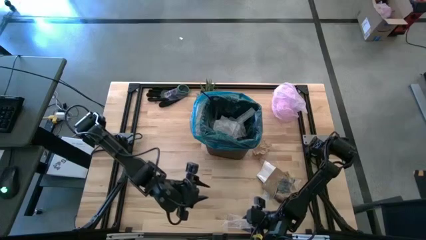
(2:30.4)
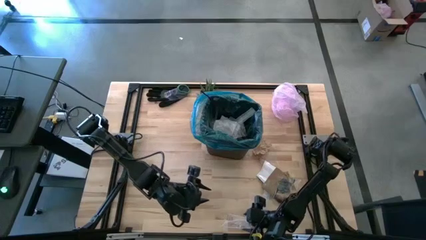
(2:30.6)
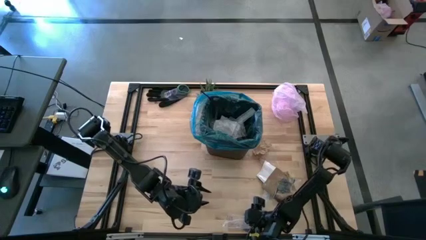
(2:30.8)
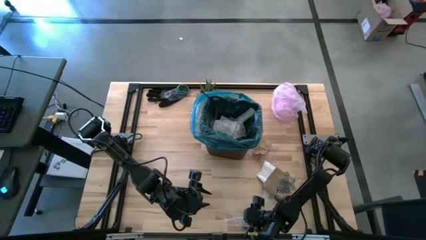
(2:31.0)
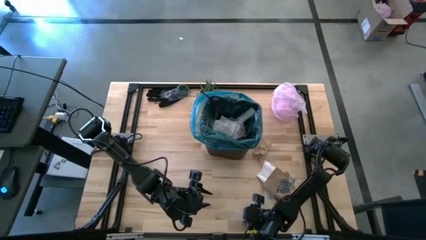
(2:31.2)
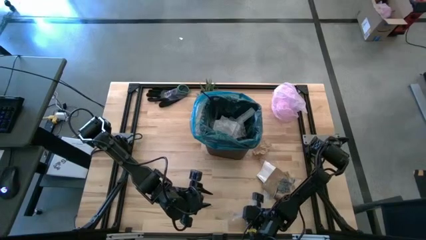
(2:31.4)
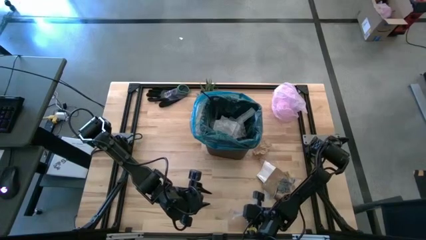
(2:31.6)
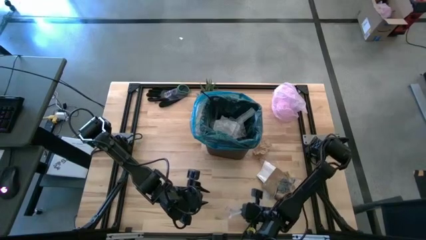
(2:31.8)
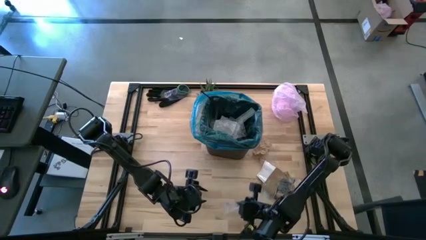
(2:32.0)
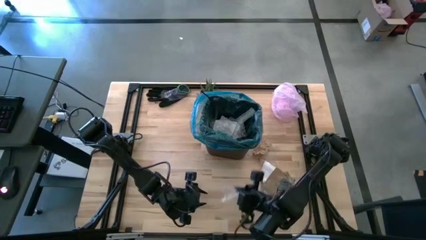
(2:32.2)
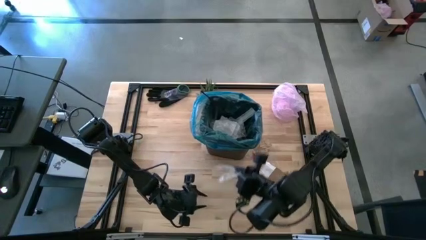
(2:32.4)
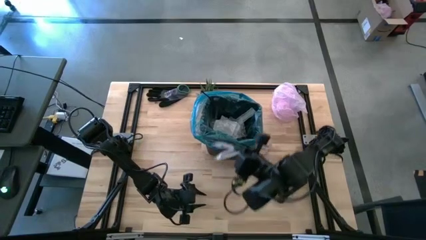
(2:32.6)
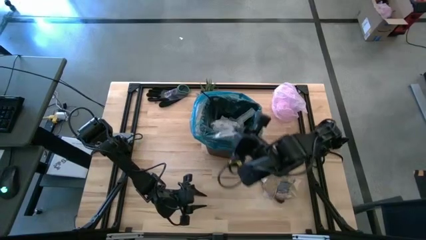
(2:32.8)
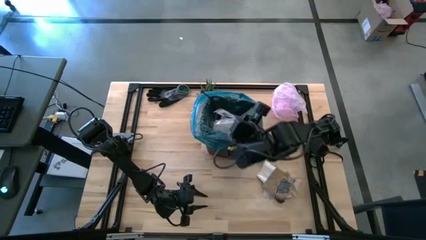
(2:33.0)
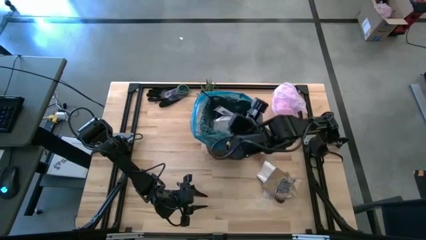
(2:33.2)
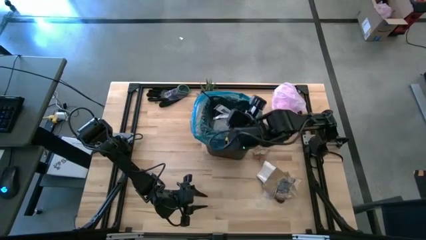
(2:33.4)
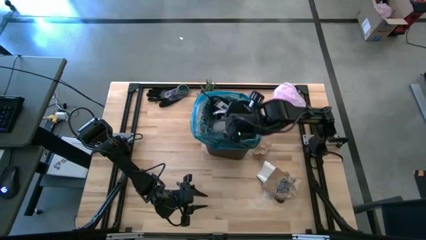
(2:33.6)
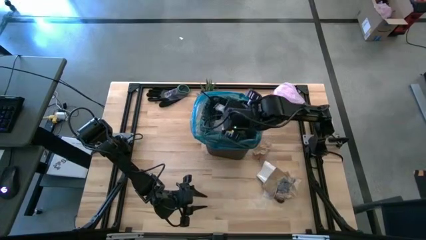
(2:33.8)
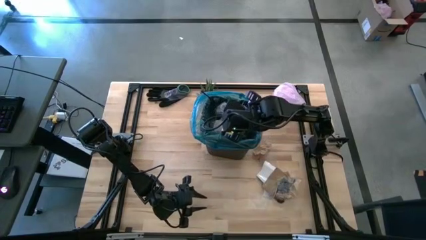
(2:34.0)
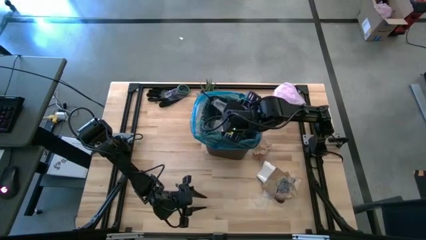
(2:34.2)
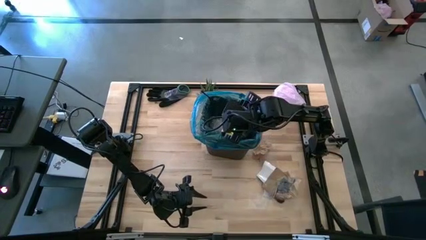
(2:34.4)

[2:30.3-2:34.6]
Task: place trash/remove bag and relplace
Put the transparent plastic into the trash bin

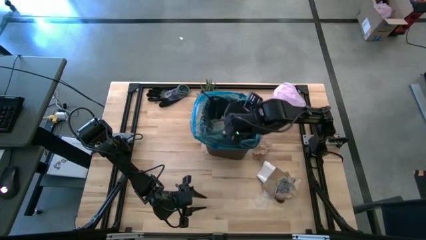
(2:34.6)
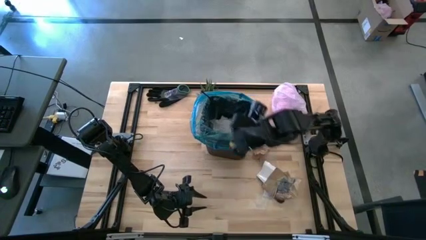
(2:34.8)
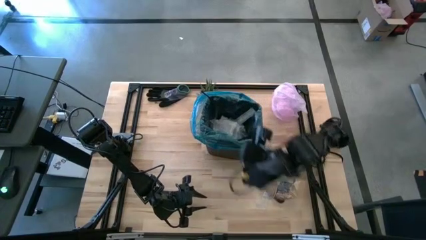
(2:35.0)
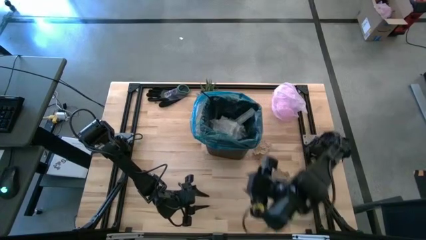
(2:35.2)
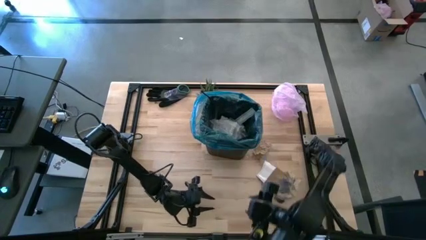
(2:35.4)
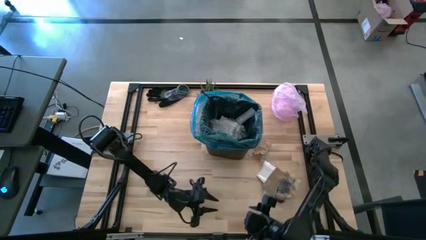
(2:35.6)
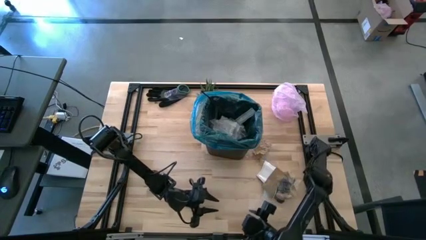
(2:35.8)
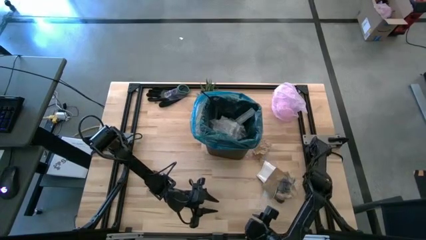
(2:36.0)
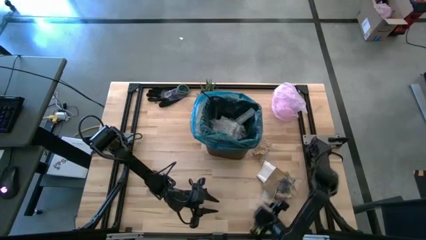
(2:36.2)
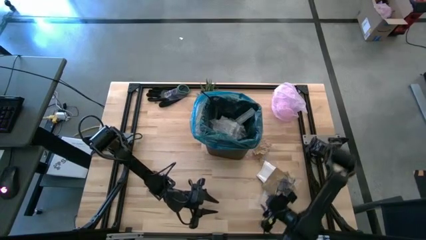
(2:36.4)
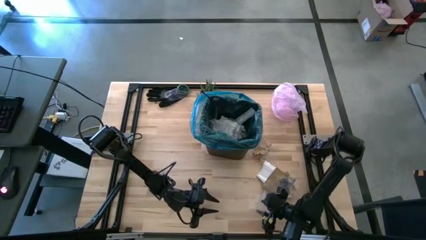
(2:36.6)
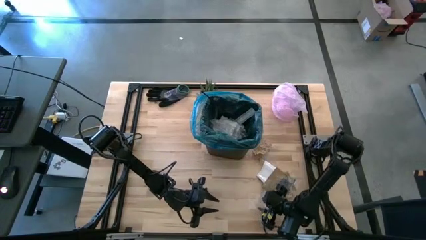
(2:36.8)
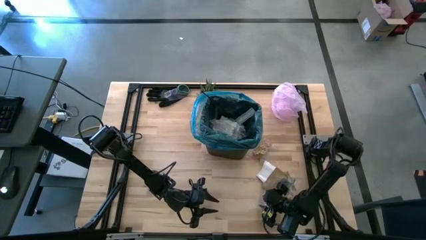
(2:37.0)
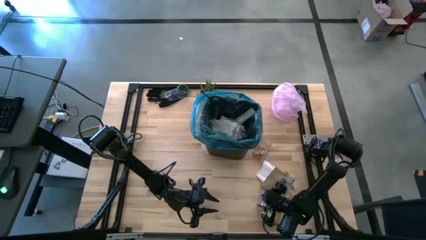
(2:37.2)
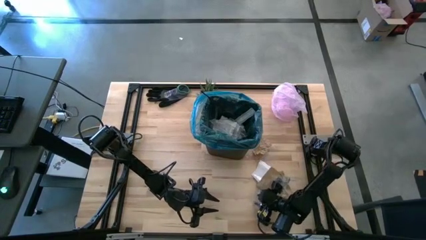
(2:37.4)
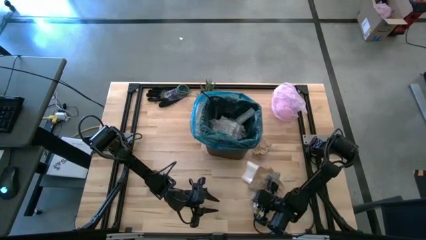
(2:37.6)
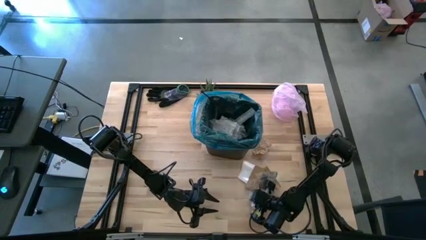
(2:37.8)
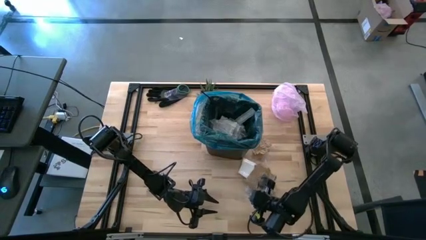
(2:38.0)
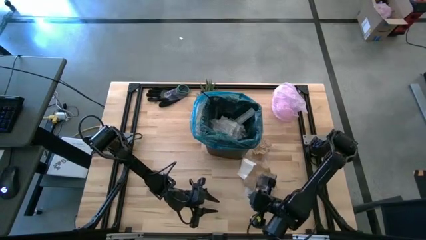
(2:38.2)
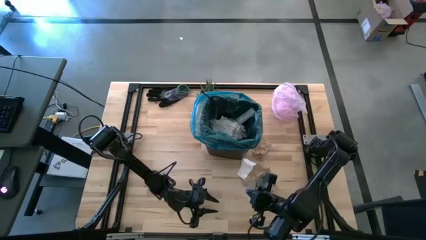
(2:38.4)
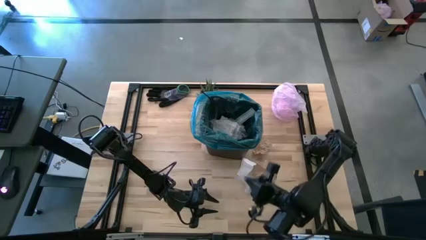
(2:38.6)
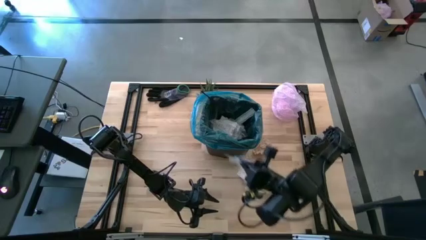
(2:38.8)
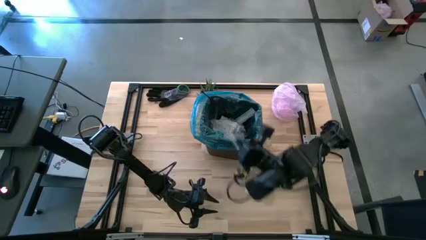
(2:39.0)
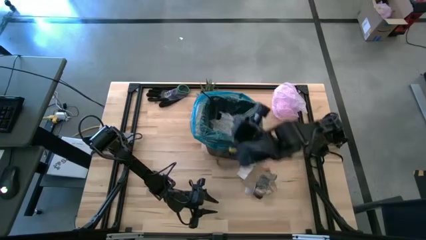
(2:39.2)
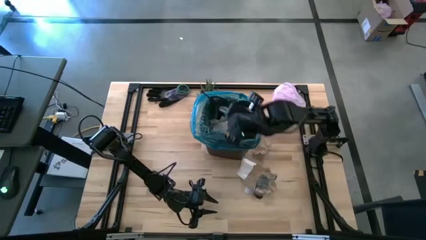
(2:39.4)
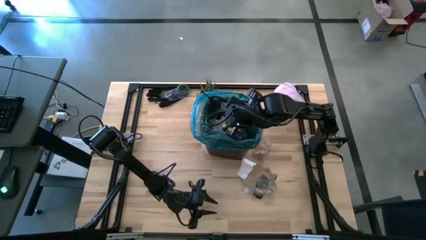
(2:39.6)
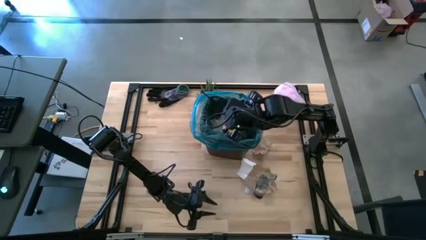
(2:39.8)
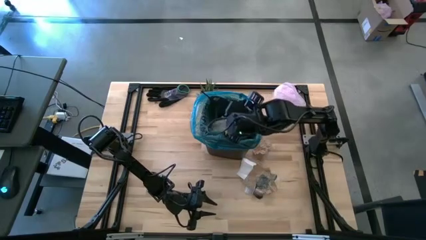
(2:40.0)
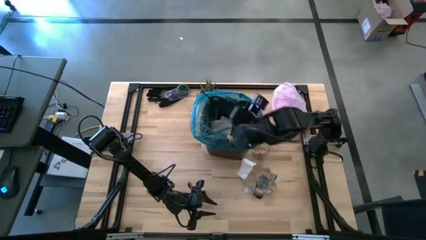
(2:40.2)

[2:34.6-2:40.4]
Put the transparent plastic into the trash bin

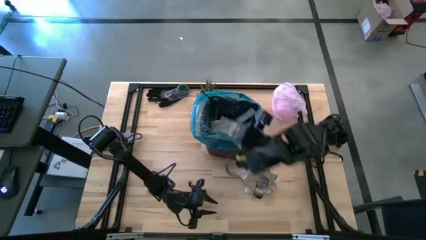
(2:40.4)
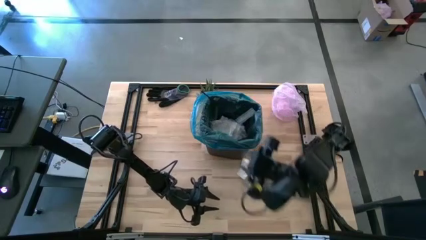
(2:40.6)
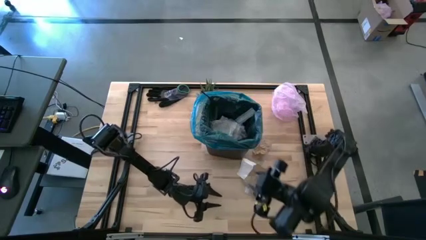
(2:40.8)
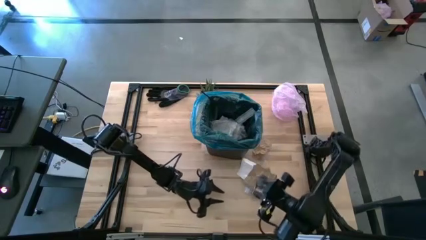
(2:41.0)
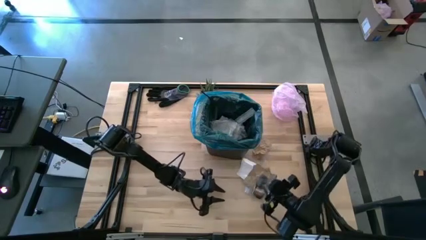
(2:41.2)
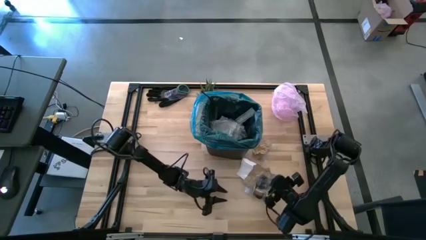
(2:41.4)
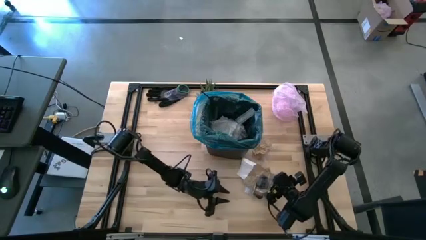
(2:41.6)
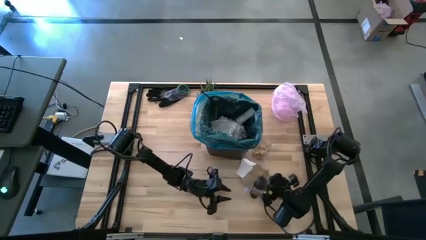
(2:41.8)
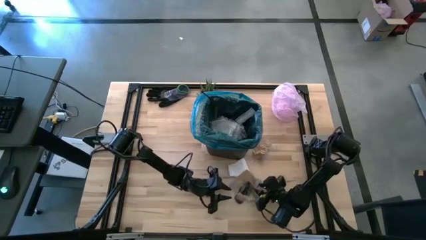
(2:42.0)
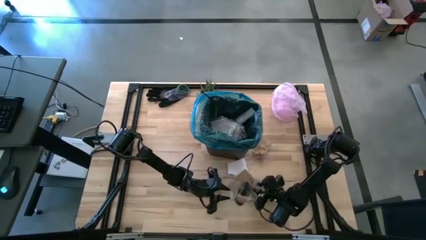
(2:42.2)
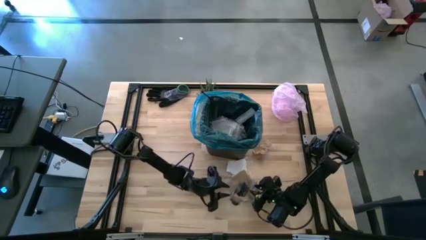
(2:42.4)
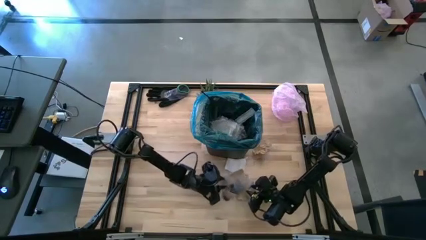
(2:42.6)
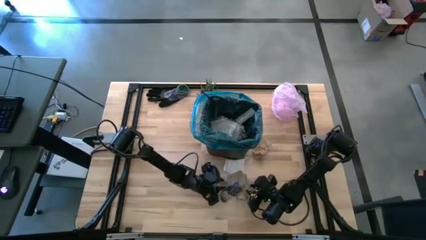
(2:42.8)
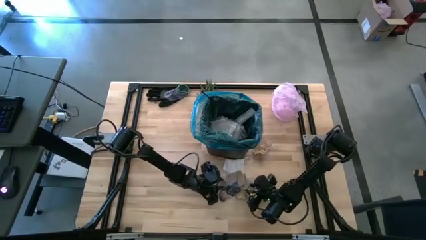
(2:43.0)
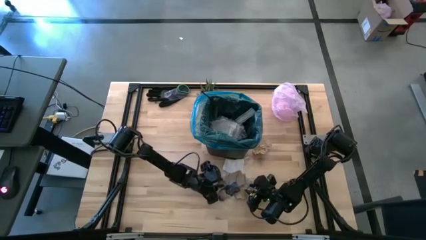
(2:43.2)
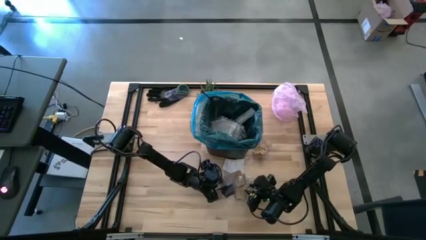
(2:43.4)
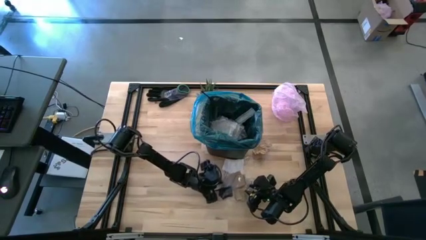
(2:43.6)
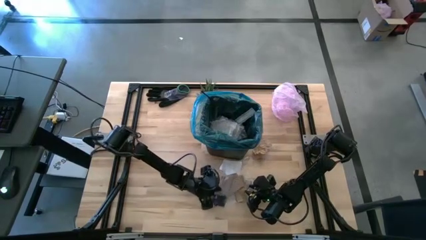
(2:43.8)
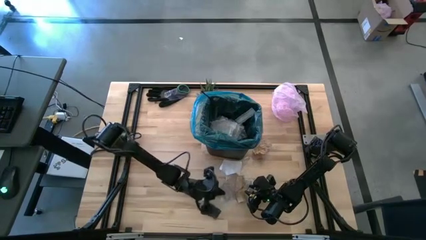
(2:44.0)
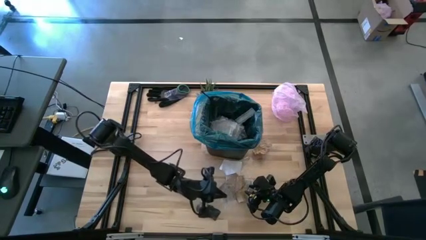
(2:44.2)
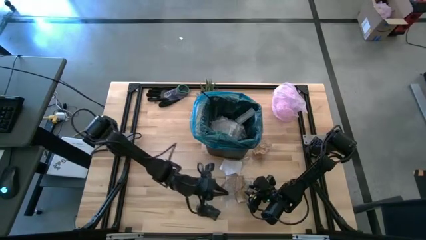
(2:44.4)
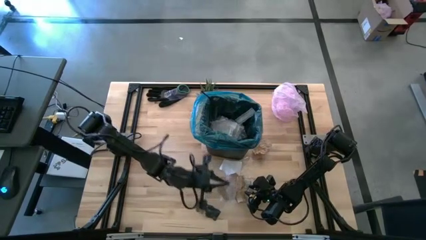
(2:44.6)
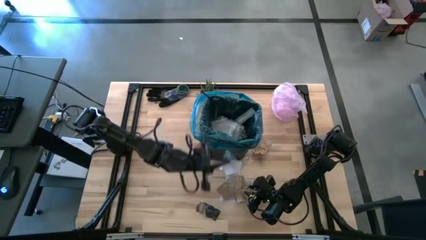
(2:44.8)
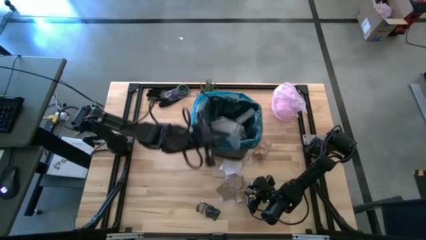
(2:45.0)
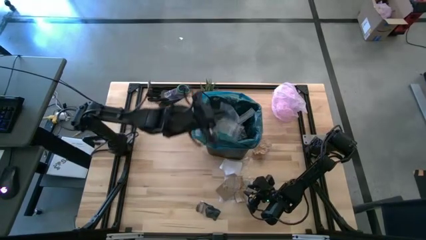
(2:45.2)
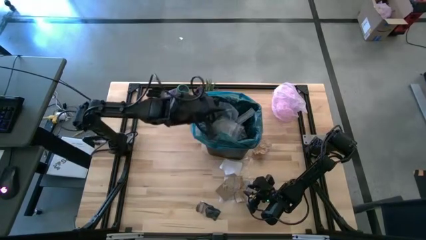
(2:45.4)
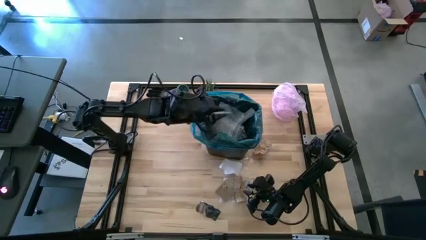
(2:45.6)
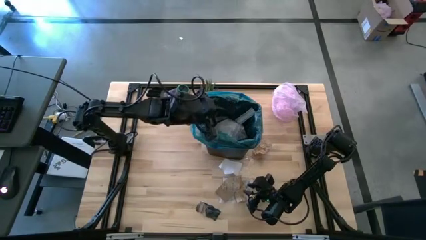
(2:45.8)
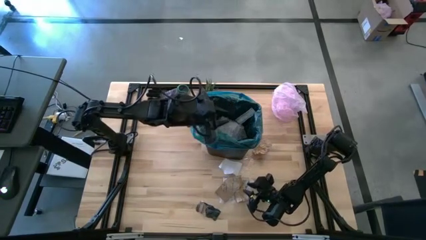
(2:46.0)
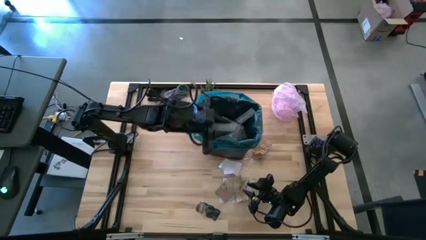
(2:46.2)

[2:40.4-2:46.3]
Put the transparent plastic into the trash bin

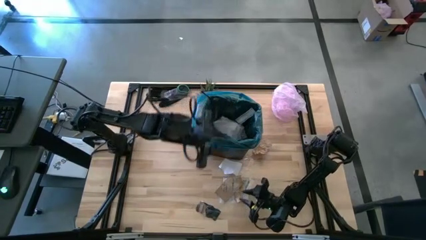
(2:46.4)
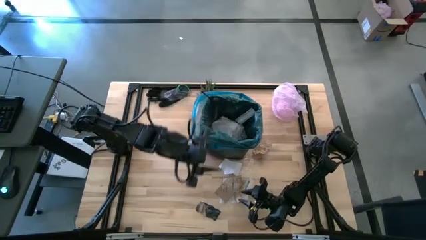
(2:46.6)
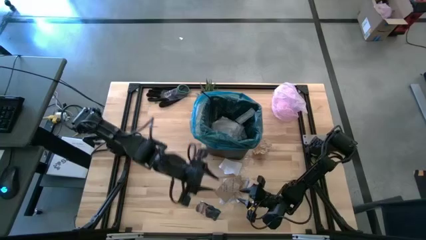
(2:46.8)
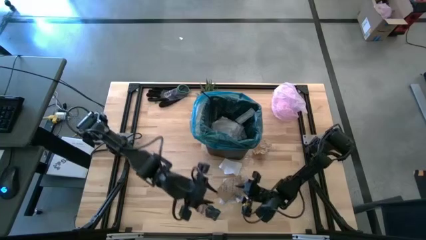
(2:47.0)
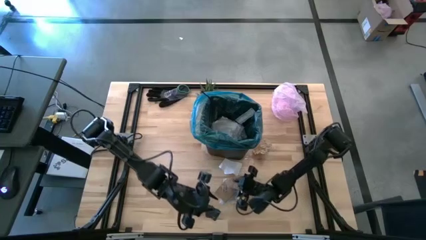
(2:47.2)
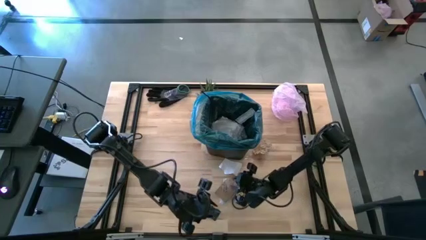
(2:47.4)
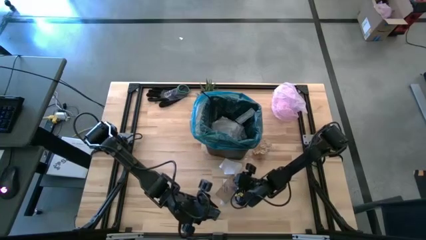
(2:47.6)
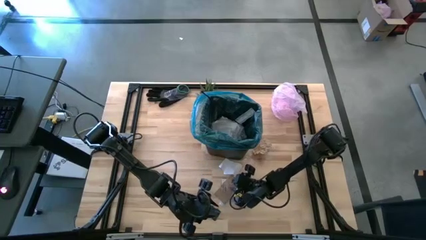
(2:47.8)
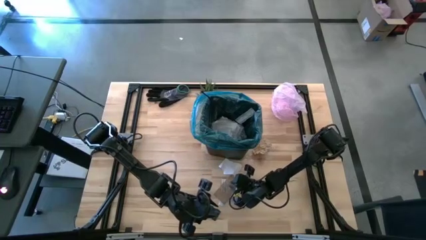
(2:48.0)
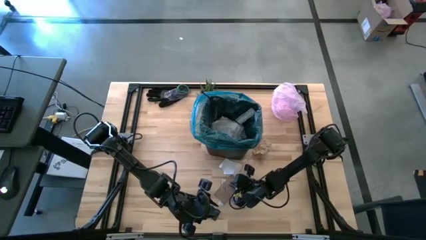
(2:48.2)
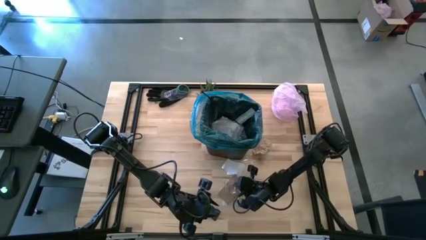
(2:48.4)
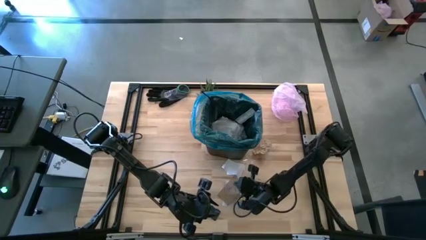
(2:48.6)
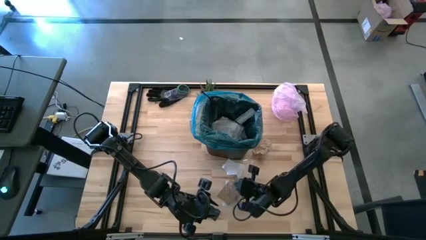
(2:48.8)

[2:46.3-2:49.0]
Put the transparent plastic into the trash bin
